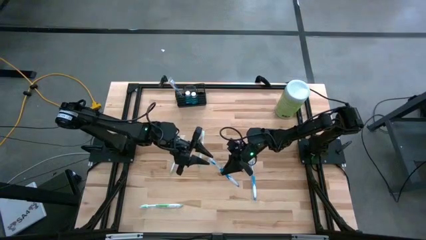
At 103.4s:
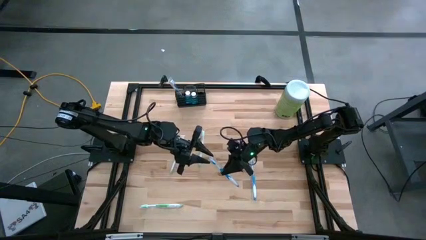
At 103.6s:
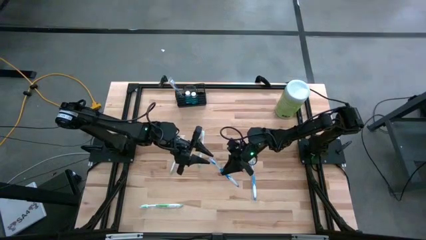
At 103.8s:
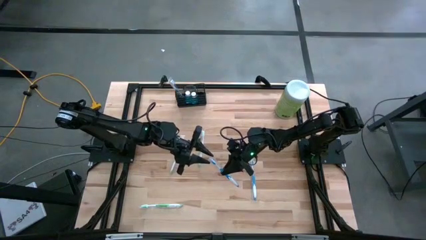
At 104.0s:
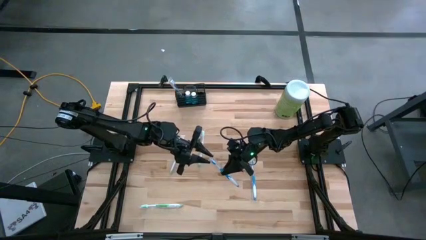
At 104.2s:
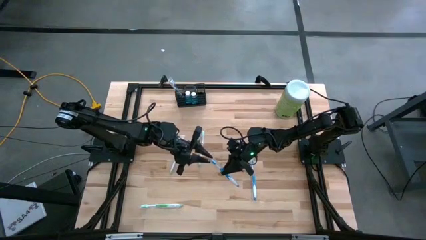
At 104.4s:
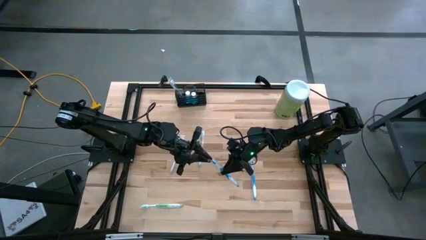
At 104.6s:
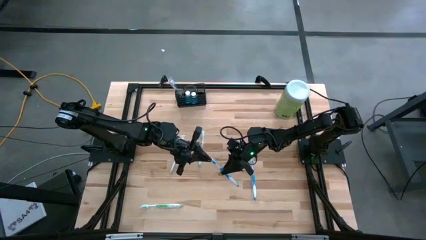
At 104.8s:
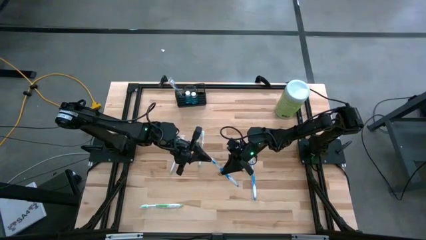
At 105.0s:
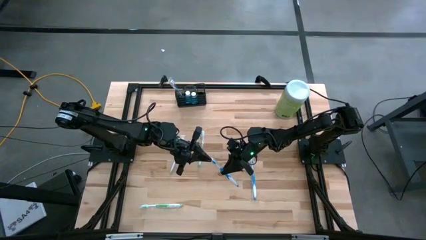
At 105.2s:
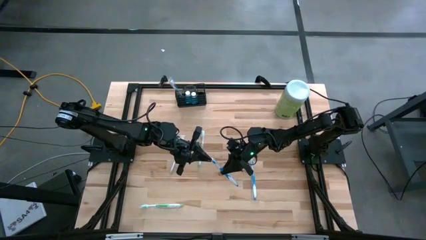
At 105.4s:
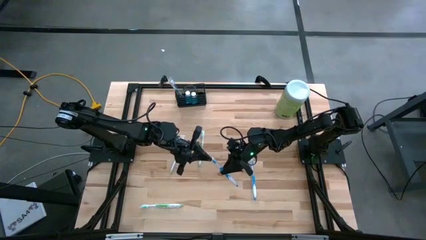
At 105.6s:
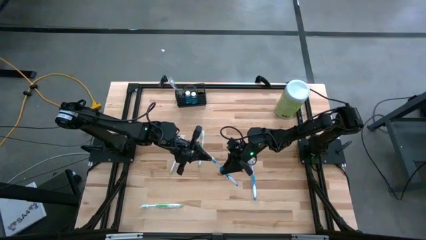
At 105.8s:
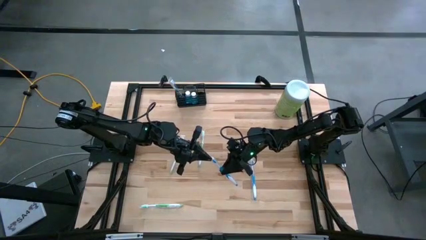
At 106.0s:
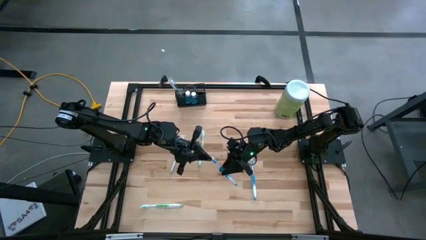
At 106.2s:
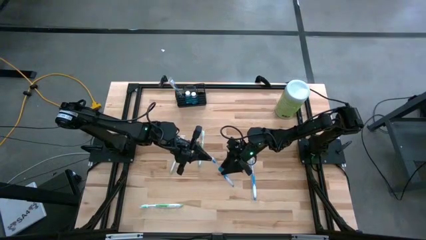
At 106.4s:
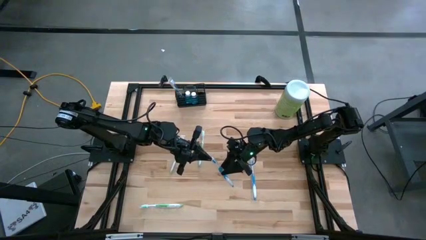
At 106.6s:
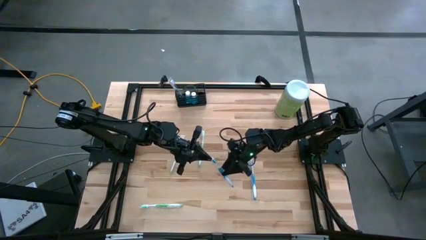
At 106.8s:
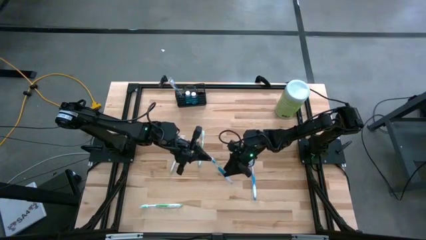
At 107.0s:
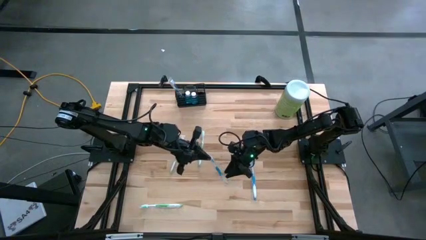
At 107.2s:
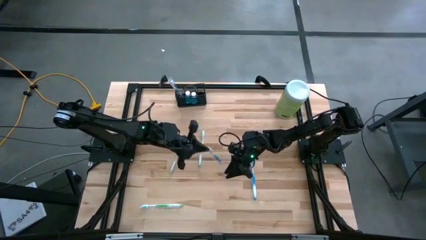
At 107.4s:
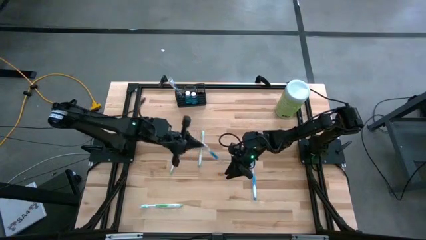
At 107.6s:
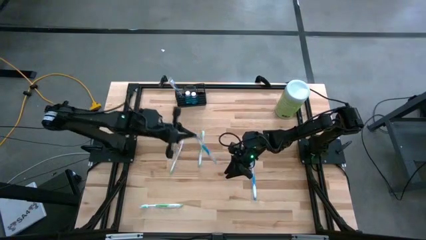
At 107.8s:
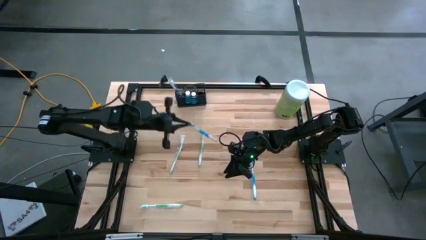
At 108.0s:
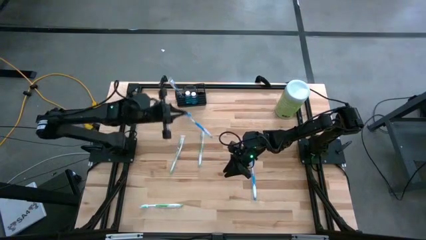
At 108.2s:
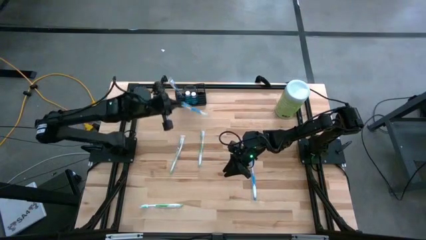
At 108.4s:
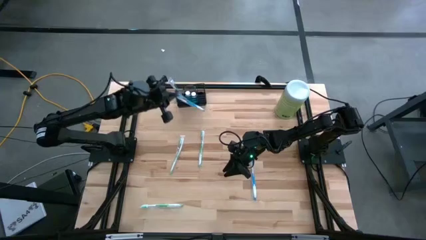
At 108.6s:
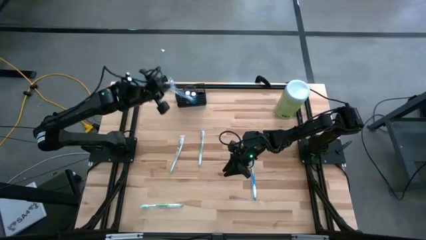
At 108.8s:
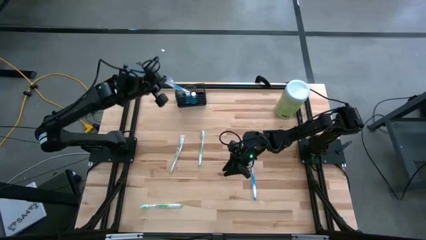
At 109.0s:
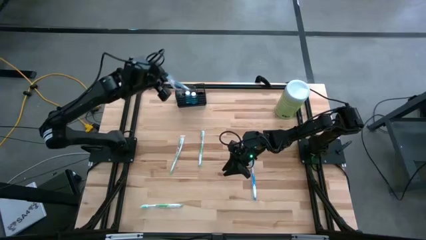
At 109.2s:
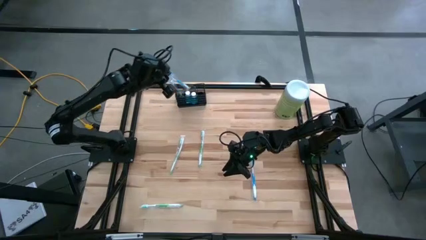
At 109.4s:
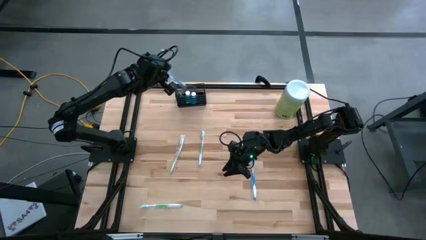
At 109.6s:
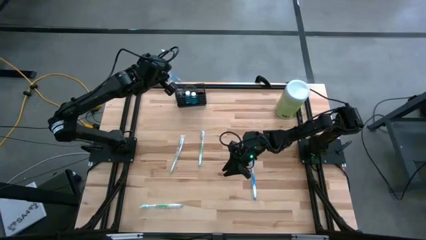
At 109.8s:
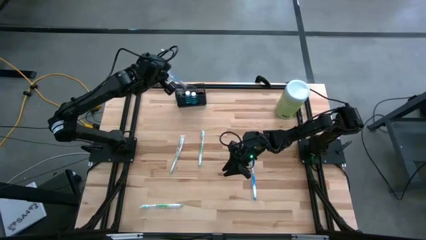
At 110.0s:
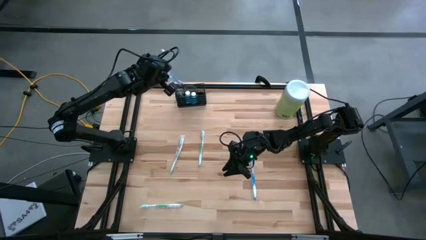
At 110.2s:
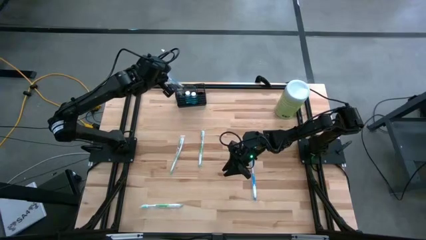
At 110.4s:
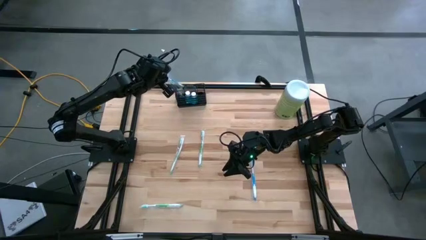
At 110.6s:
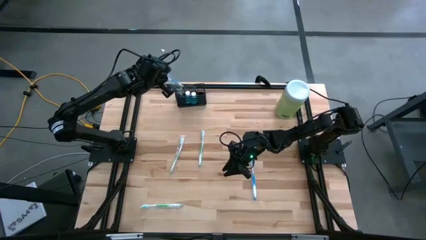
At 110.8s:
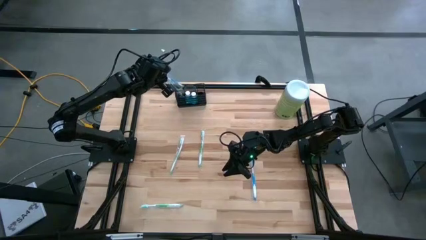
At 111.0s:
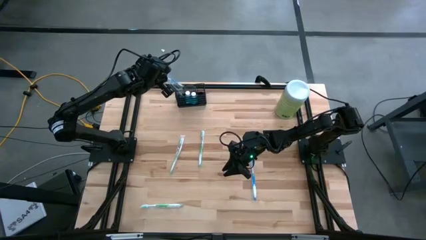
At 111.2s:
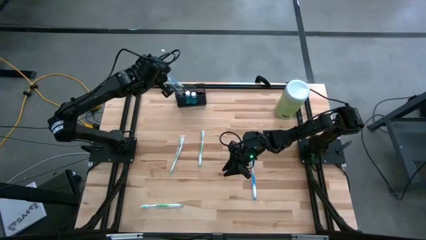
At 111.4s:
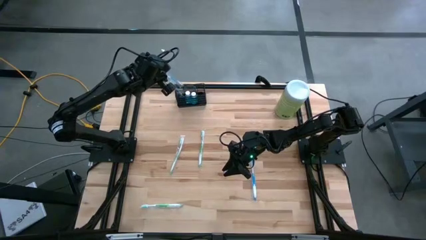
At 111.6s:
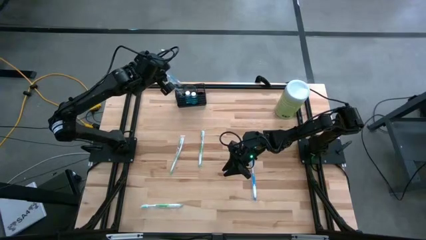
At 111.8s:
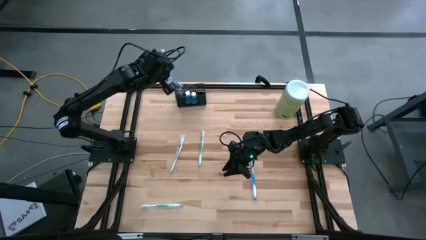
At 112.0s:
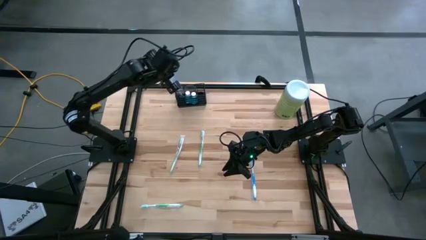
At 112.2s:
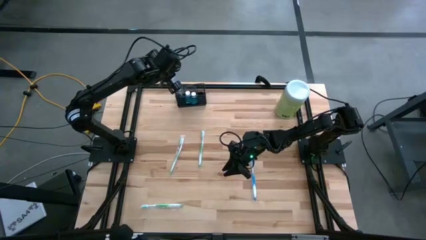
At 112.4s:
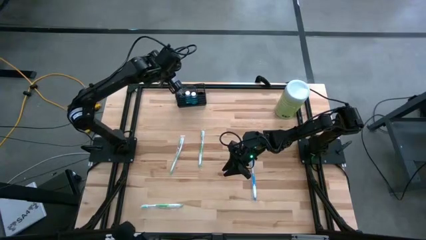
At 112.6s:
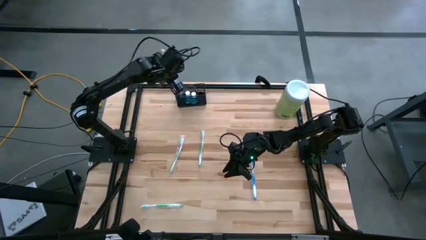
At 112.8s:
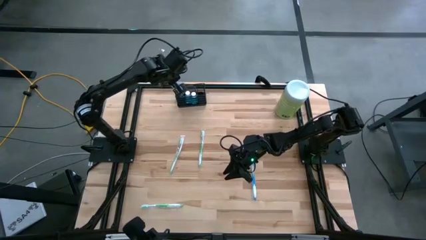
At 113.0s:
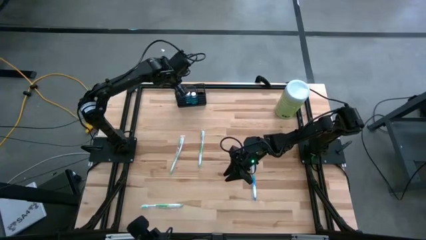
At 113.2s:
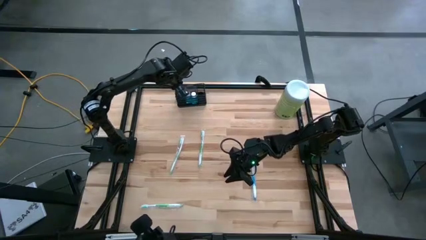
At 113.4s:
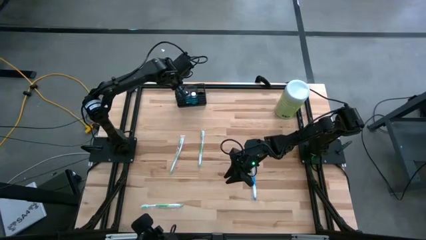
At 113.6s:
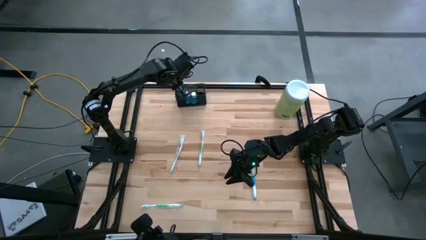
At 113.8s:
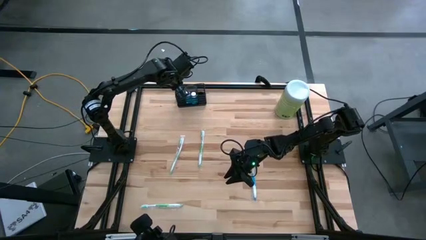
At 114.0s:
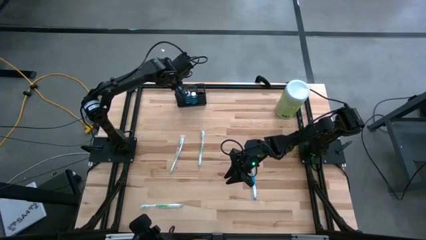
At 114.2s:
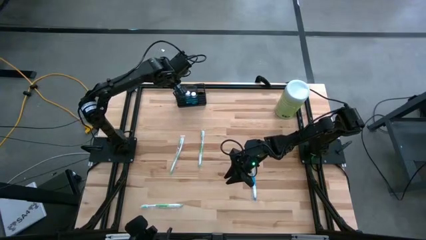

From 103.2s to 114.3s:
Task: Pick & Place toothbrushing station
Put the right blue toothbrush into the wire organizer
